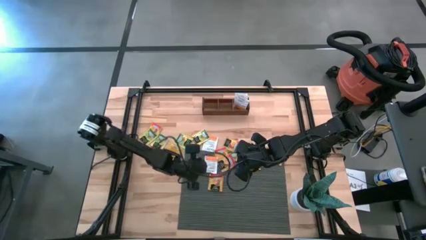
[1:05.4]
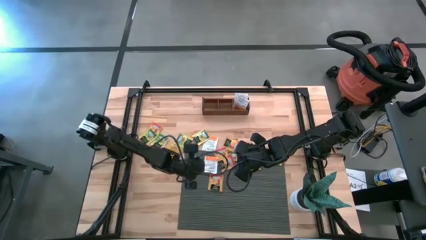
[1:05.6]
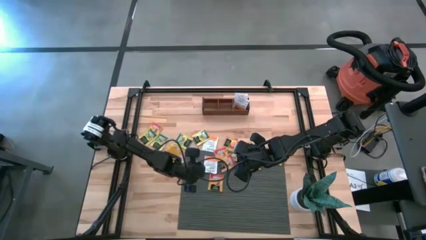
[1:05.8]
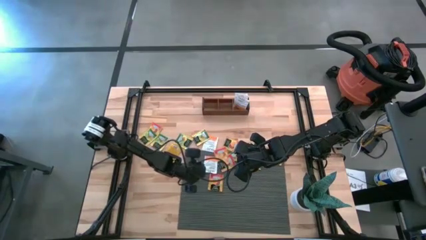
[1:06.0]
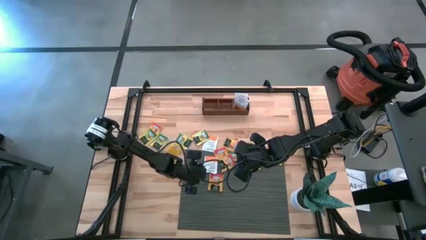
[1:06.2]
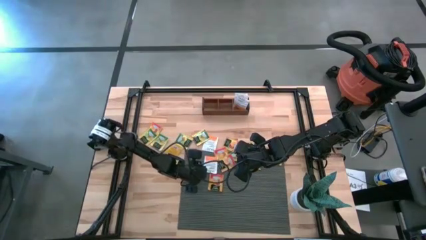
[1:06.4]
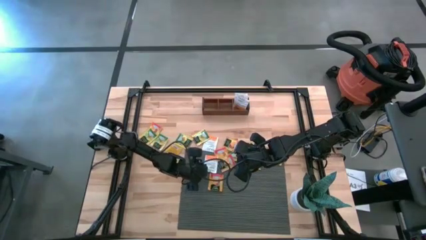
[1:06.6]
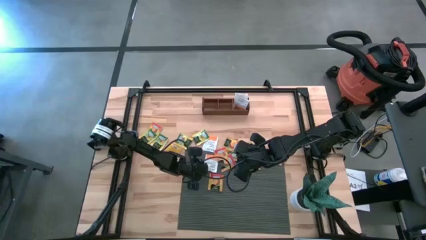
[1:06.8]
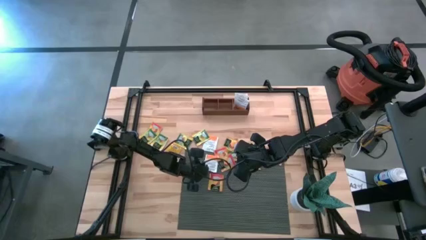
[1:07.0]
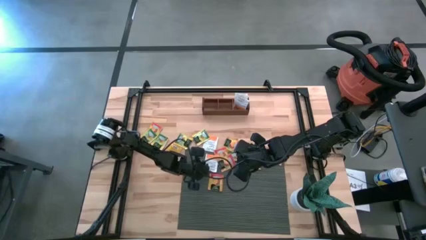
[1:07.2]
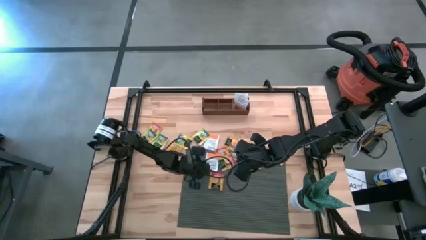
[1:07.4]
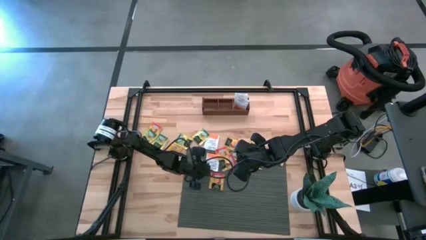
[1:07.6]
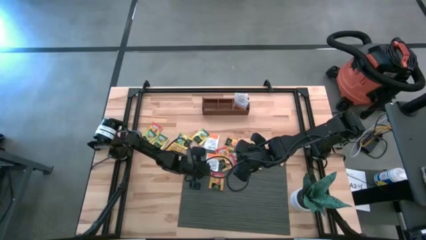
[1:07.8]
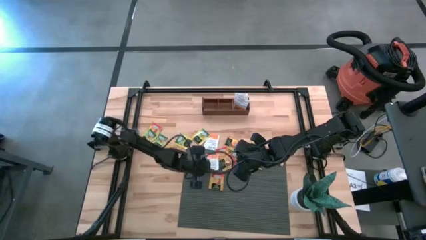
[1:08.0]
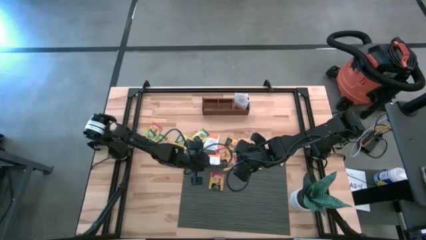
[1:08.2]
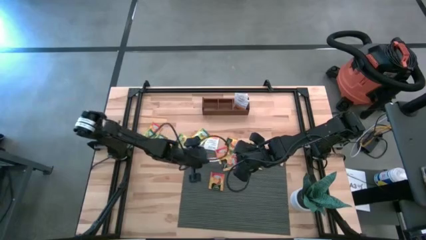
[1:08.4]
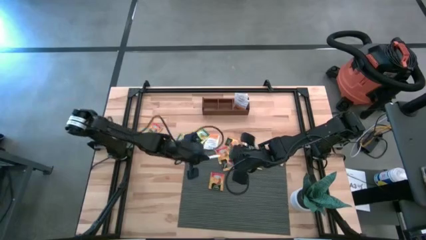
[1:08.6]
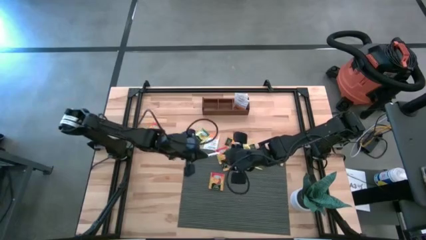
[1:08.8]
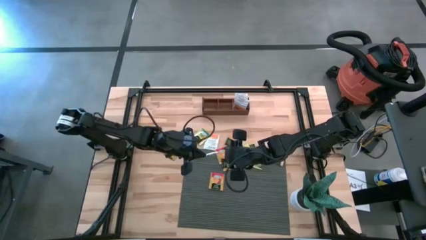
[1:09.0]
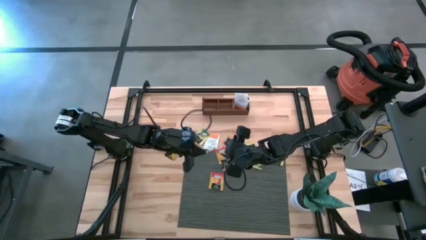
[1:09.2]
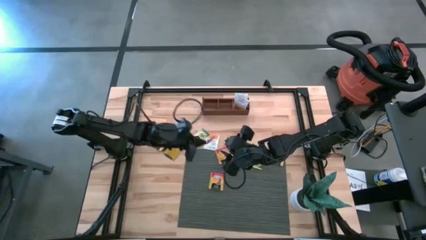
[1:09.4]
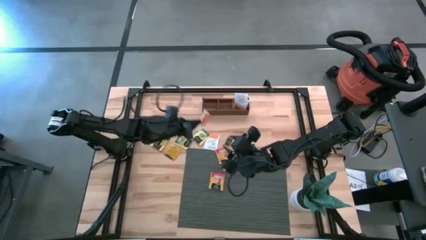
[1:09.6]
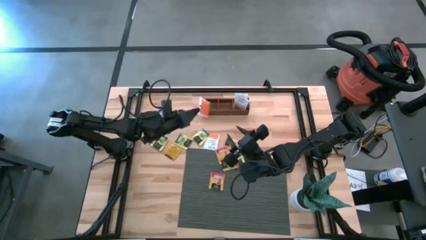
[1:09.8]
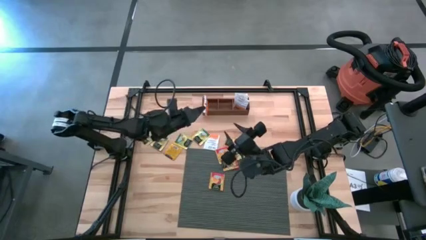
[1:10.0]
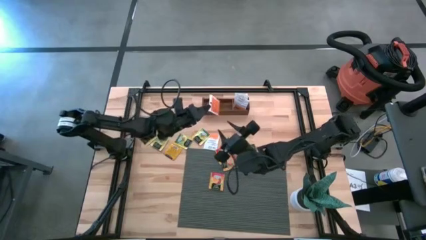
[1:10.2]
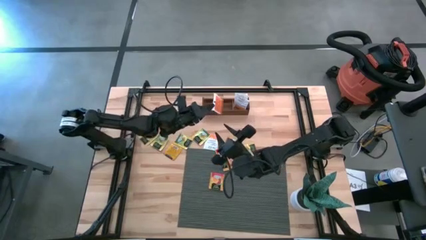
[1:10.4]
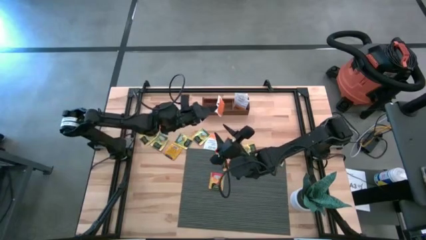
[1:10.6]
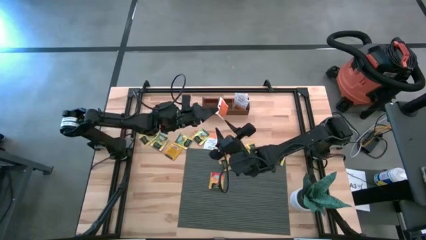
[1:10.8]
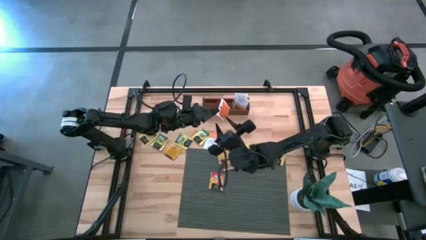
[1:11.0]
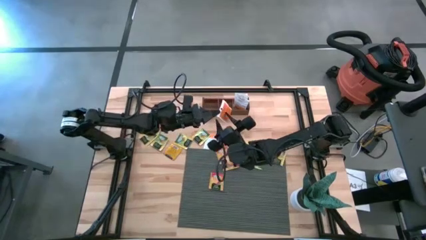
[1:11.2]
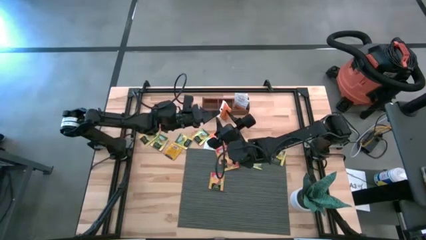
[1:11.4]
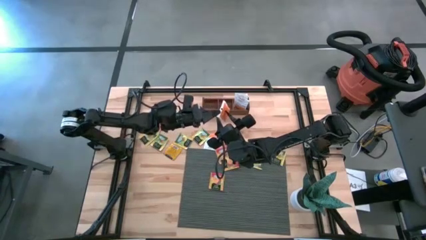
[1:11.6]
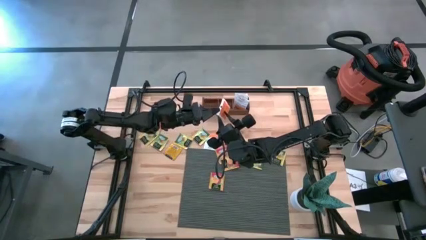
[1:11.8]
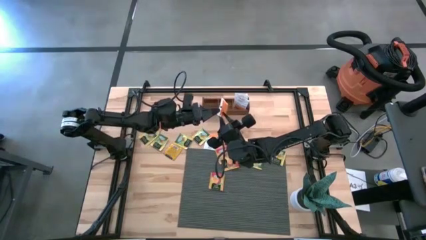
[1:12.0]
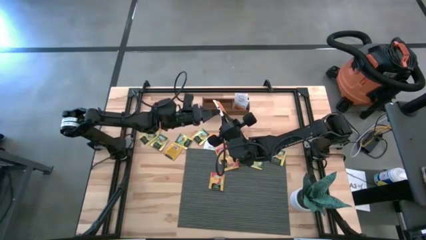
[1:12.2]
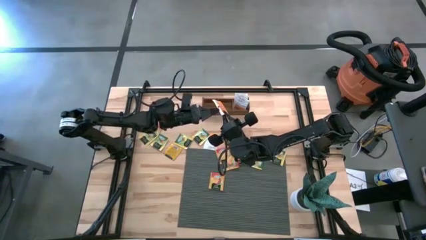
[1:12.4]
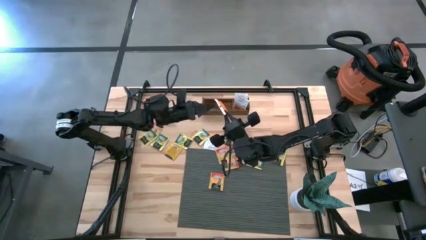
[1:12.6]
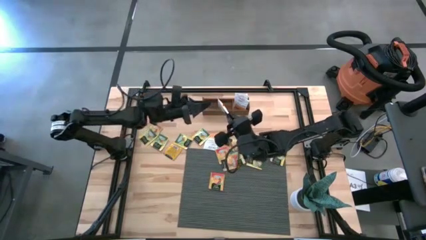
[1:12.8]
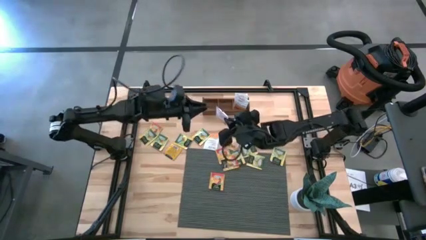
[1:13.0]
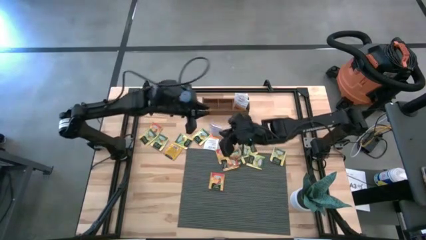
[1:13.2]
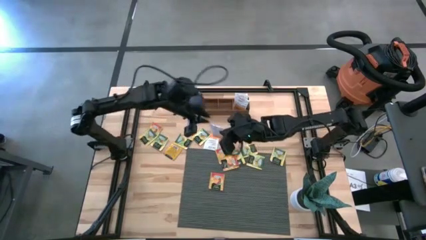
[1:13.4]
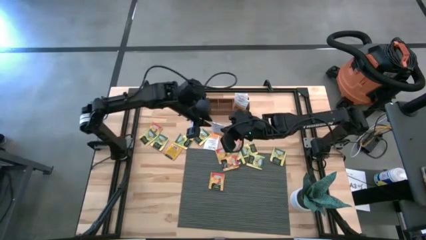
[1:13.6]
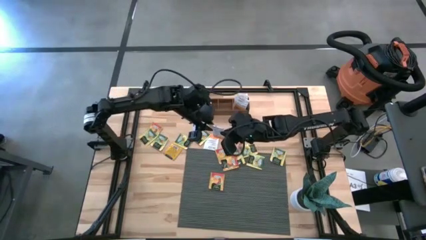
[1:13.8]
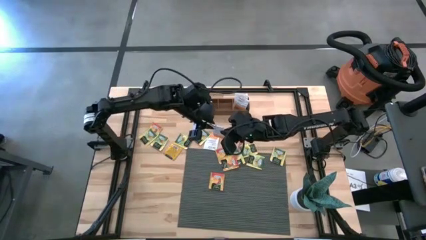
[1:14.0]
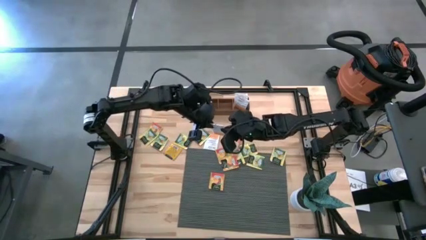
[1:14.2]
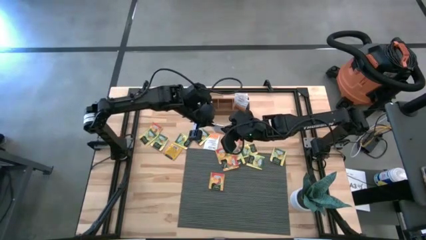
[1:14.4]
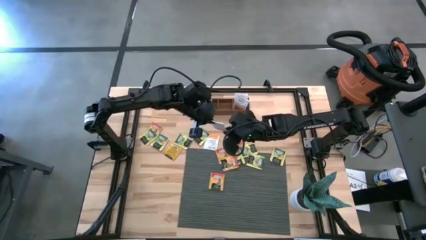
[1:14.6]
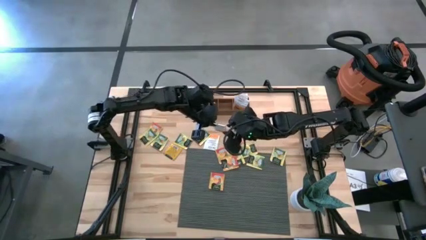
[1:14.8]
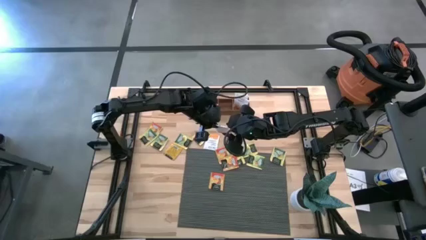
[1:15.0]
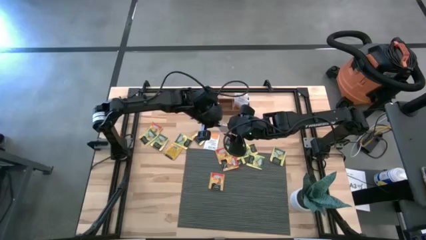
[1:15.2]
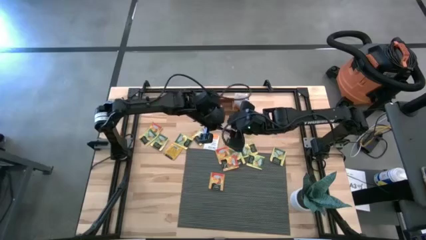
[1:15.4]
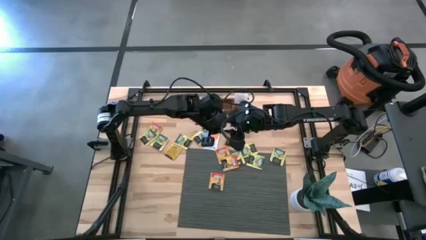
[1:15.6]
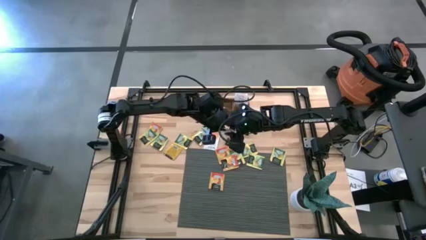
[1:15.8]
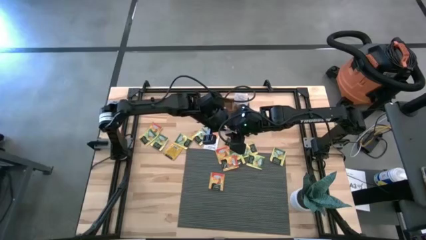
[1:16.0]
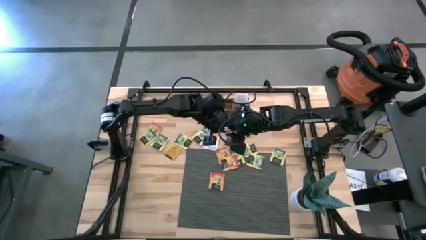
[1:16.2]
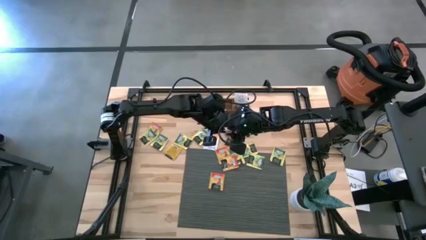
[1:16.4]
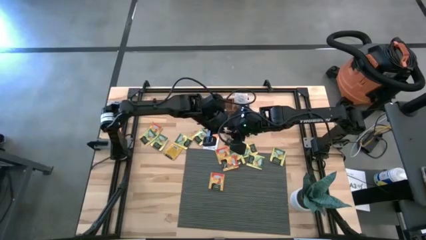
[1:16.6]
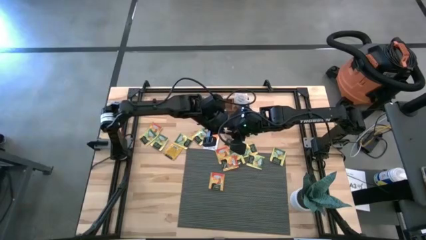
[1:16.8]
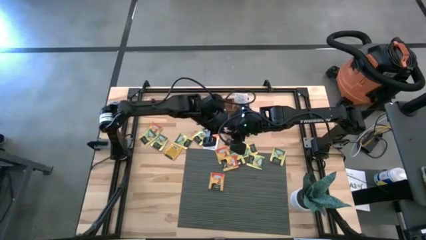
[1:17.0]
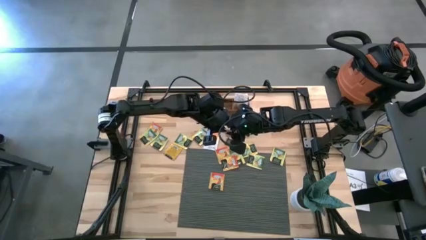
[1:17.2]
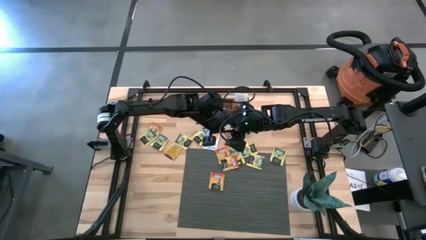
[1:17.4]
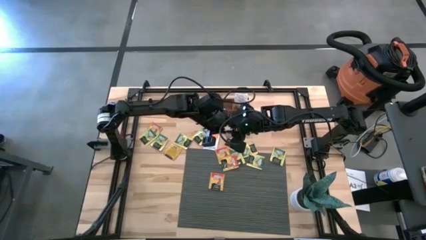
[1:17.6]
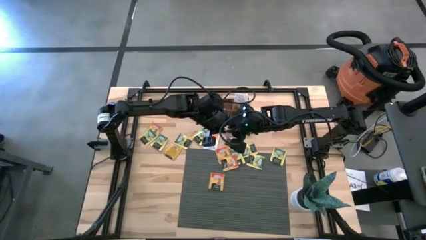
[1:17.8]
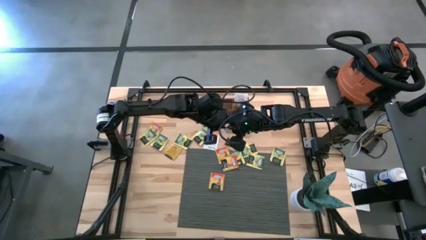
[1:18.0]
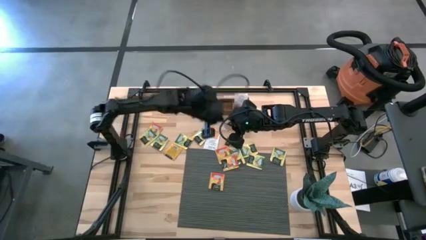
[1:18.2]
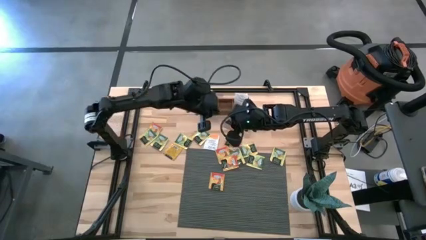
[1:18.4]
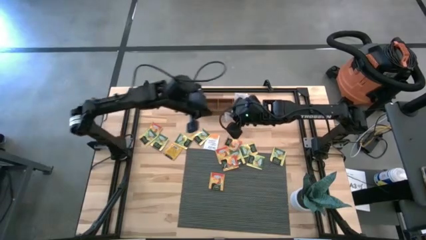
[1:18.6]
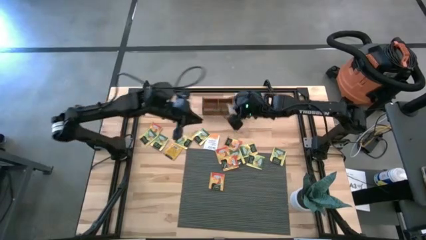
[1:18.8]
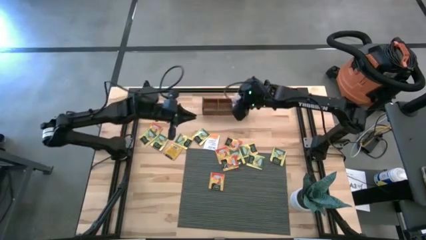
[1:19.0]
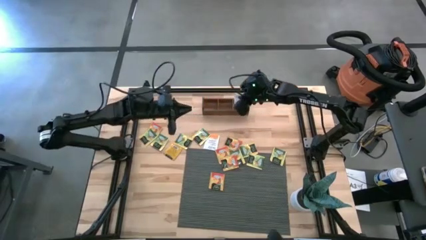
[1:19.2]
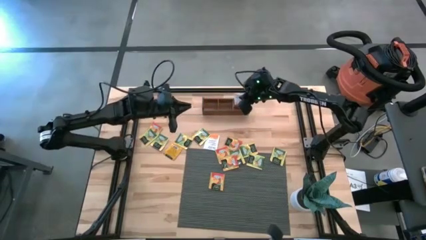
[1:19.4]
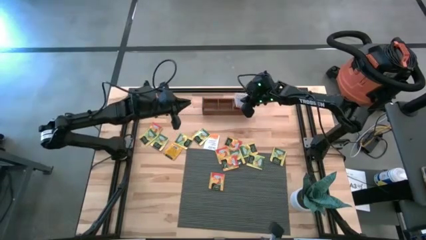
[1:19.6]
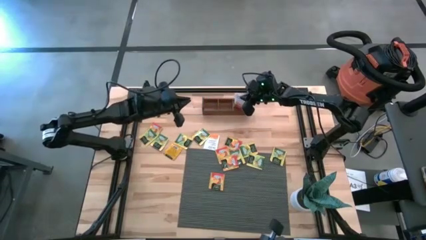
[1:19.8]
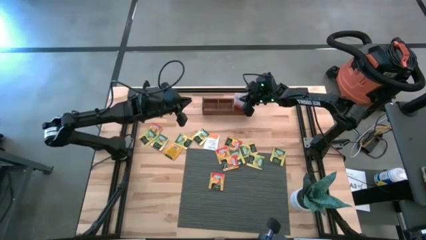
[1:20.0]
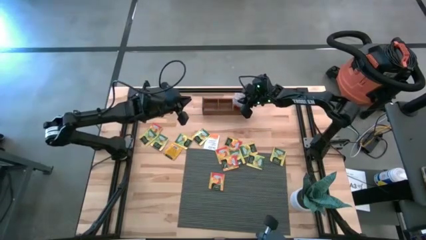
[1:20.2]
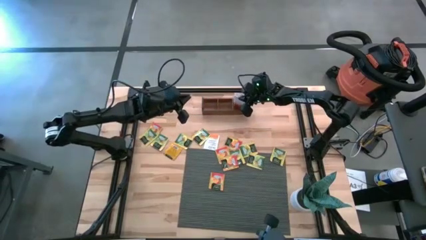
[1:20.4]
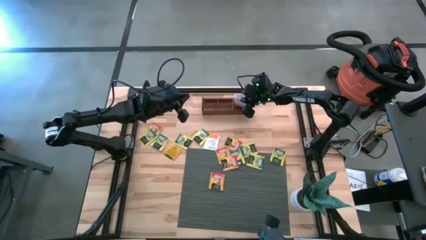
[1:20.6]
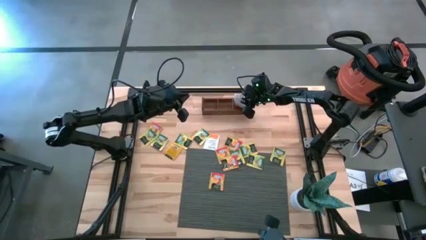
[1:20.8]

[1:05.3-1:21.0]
Task: Pick & Place Tea
Put the white tea bag into the right section of the wooden organizer

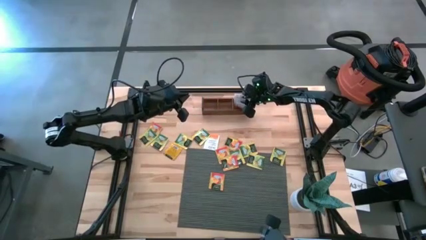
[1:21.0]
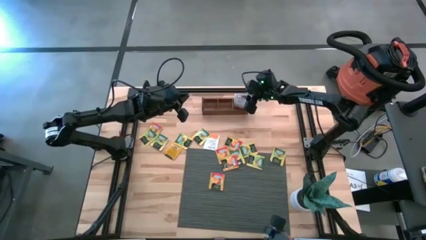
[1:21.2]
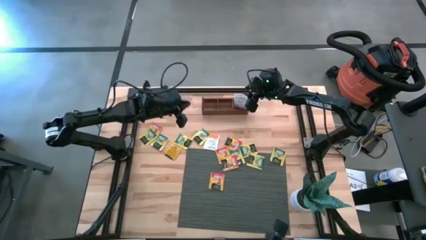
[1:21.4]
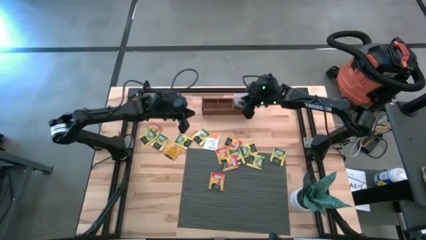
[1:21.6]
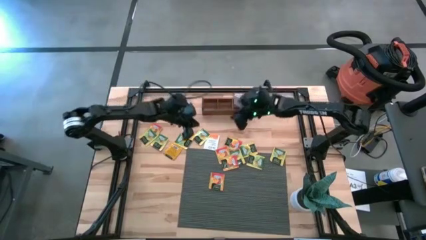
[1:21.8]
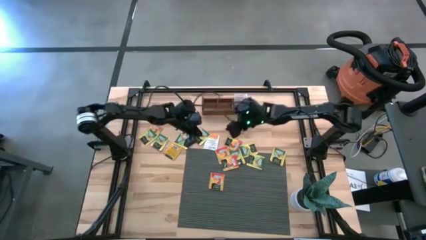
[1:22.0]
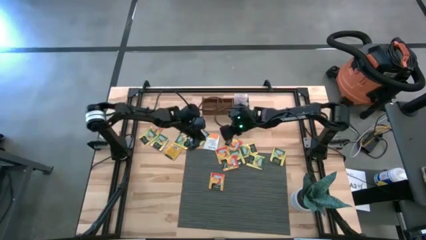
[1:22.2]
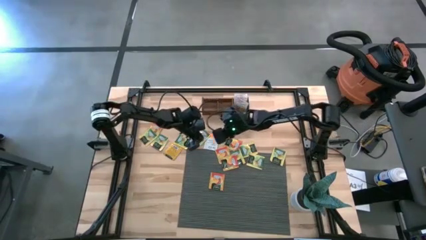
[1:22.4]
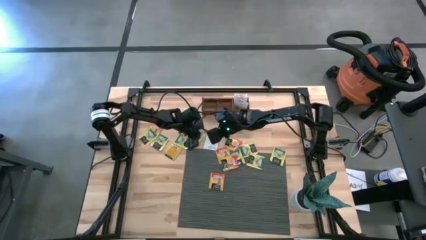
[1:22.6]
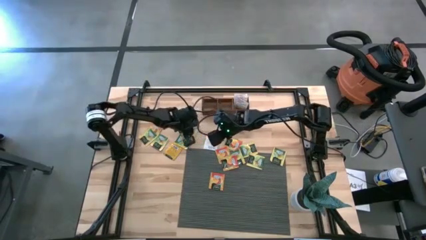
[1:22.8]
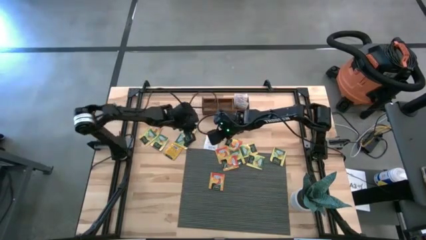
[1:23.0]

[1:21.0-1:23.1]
Adjust the yellow tea bag
